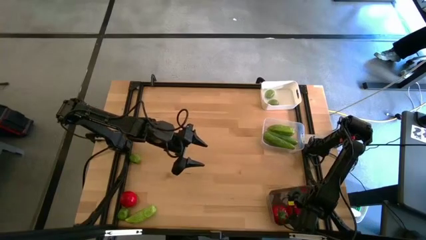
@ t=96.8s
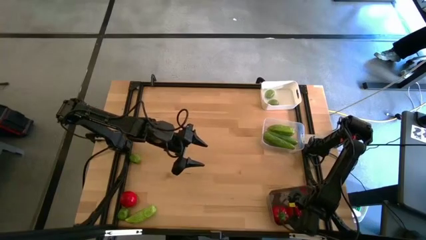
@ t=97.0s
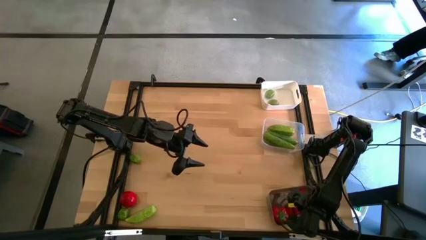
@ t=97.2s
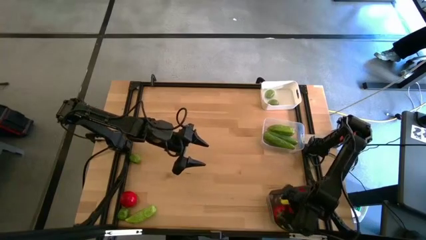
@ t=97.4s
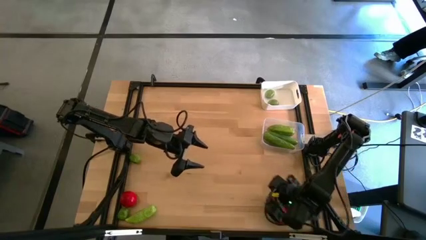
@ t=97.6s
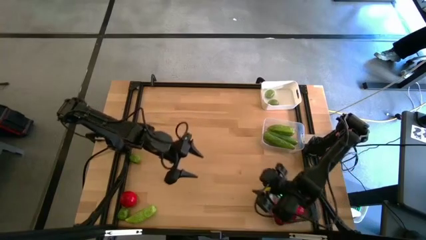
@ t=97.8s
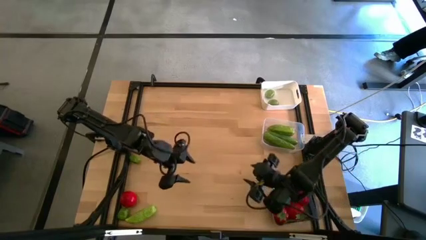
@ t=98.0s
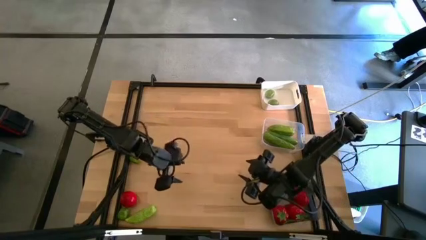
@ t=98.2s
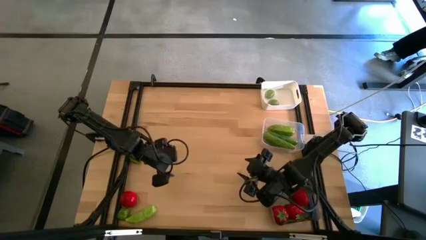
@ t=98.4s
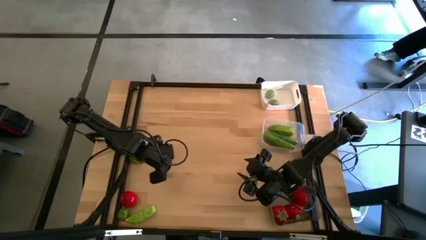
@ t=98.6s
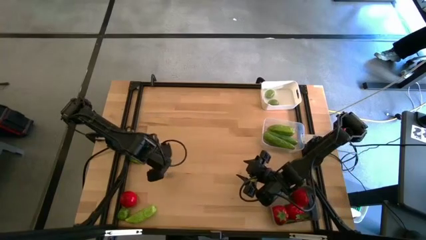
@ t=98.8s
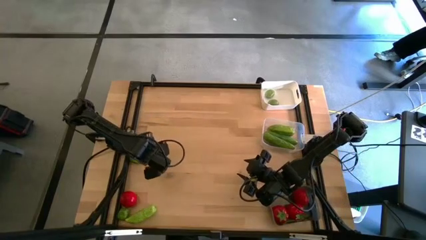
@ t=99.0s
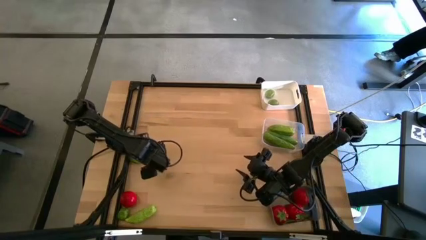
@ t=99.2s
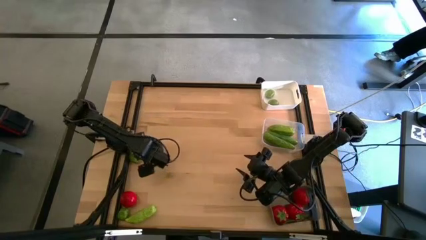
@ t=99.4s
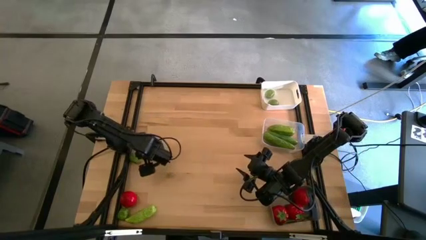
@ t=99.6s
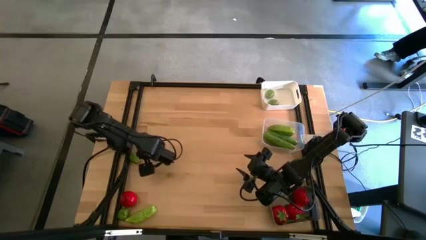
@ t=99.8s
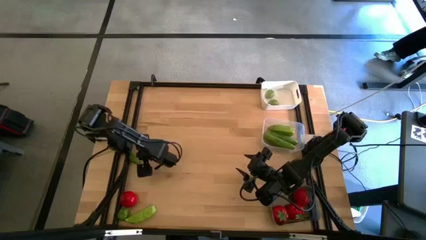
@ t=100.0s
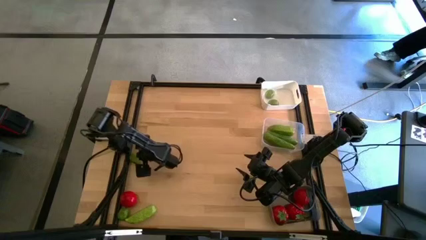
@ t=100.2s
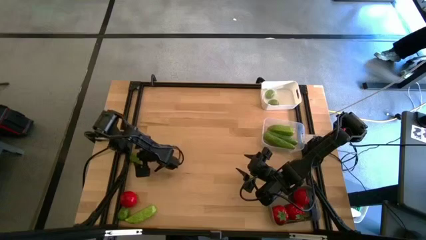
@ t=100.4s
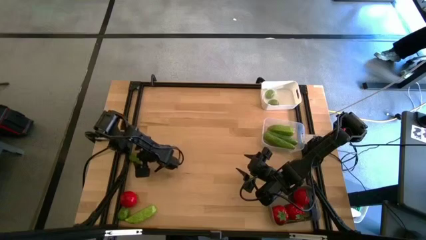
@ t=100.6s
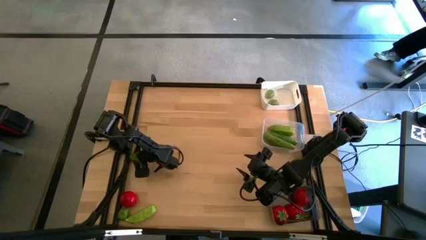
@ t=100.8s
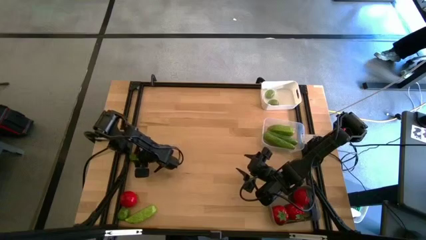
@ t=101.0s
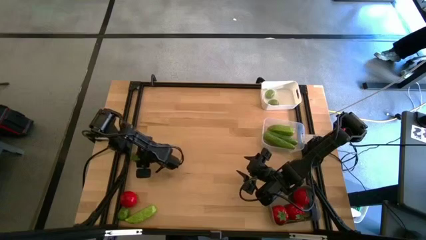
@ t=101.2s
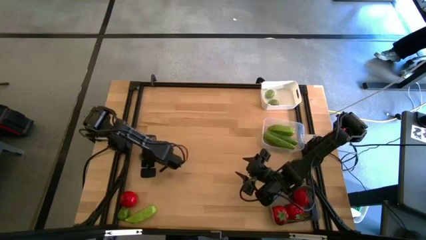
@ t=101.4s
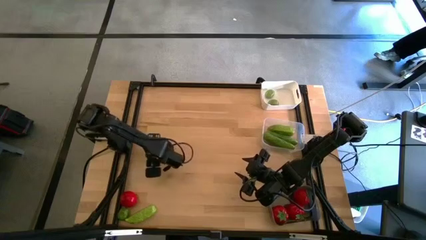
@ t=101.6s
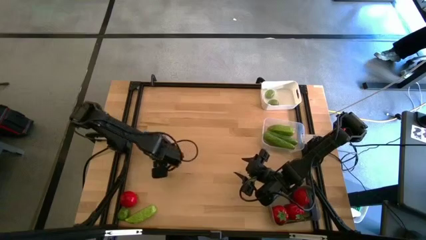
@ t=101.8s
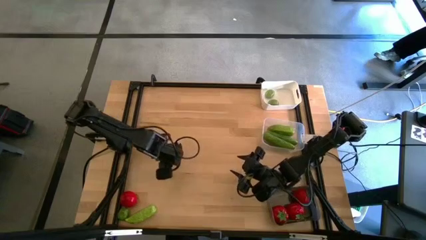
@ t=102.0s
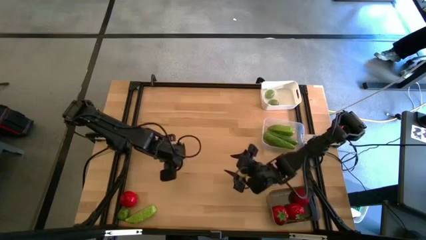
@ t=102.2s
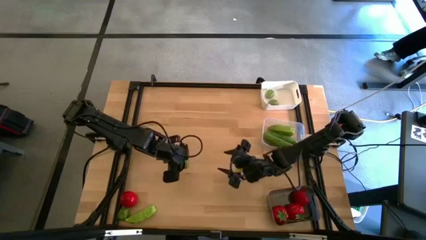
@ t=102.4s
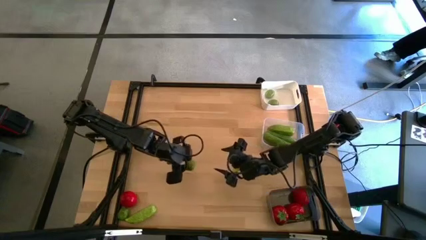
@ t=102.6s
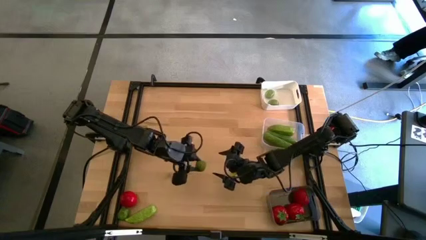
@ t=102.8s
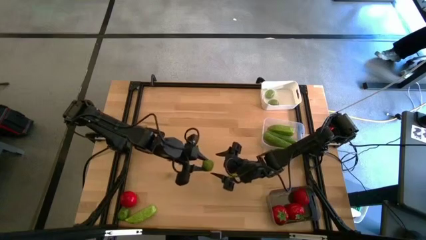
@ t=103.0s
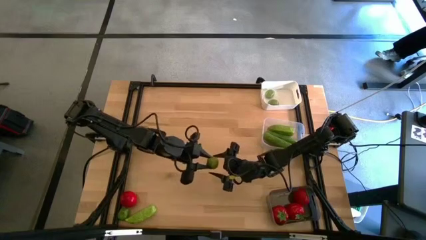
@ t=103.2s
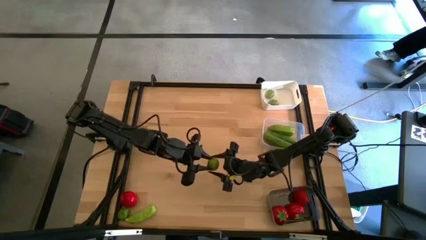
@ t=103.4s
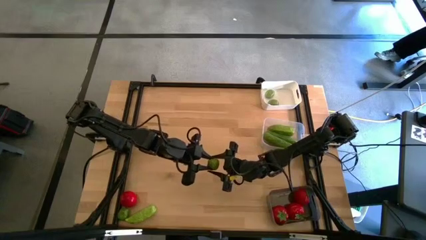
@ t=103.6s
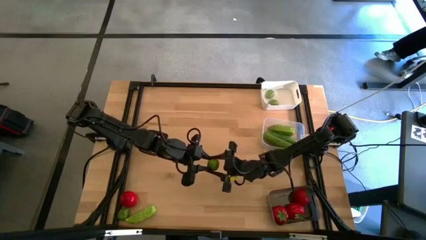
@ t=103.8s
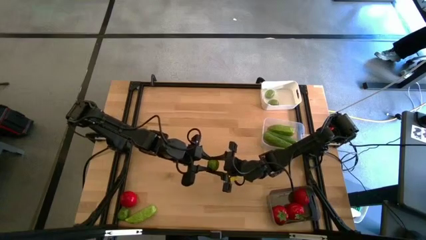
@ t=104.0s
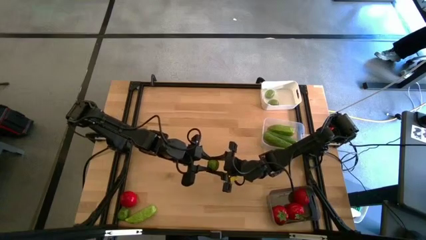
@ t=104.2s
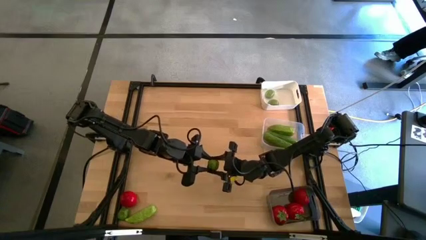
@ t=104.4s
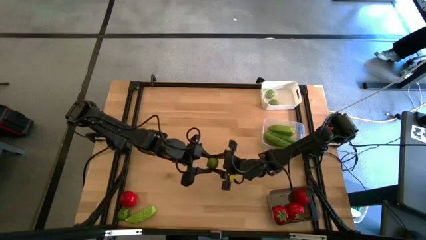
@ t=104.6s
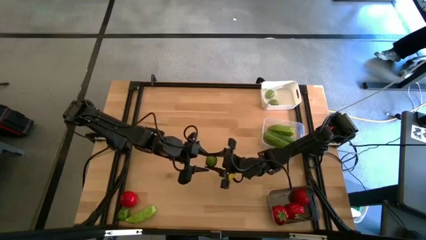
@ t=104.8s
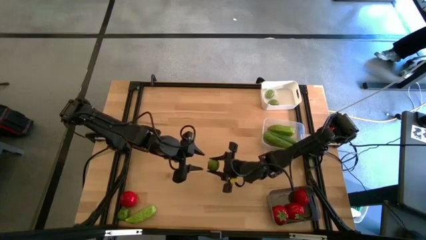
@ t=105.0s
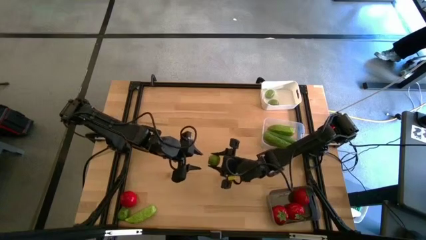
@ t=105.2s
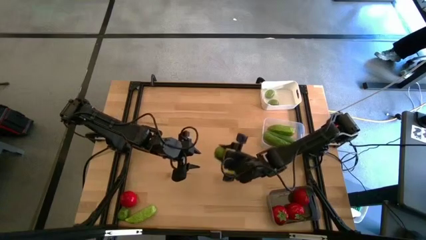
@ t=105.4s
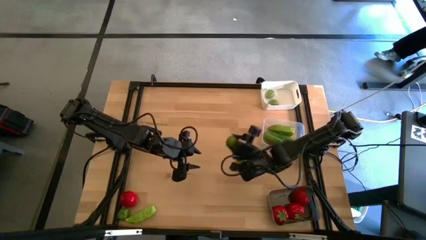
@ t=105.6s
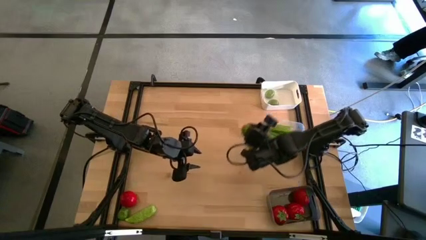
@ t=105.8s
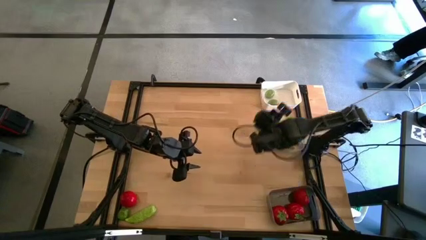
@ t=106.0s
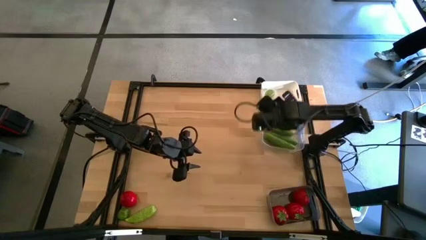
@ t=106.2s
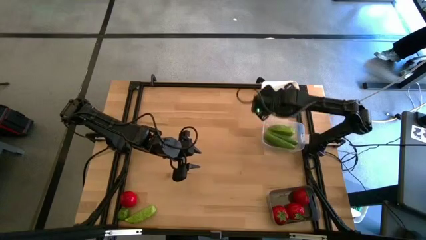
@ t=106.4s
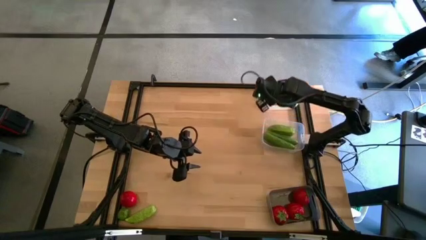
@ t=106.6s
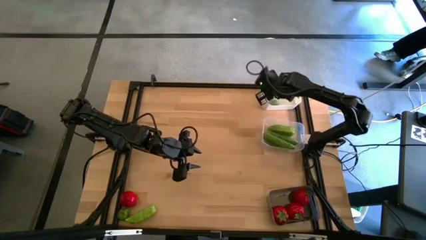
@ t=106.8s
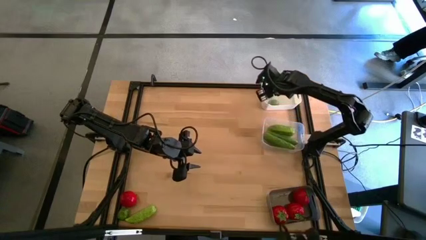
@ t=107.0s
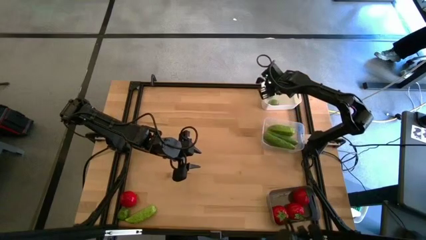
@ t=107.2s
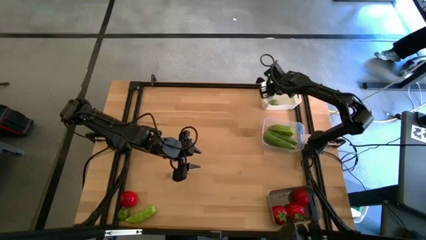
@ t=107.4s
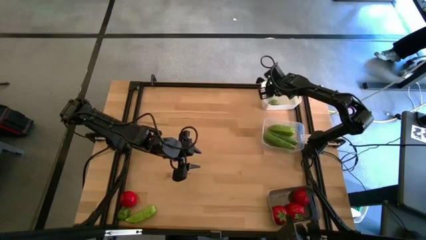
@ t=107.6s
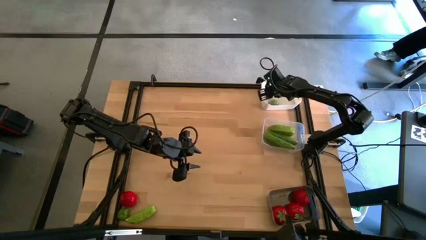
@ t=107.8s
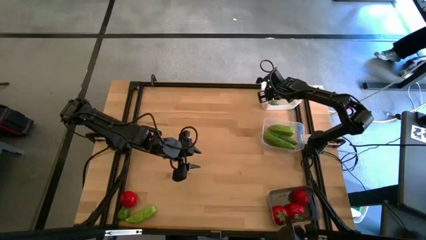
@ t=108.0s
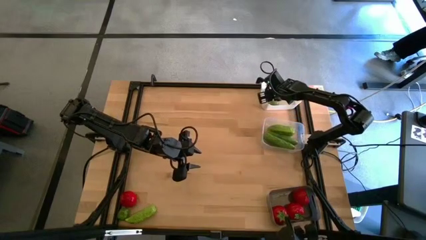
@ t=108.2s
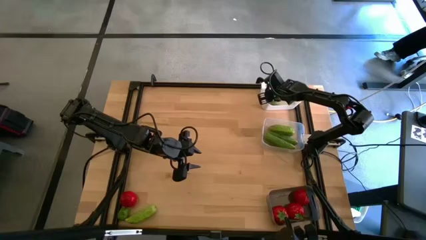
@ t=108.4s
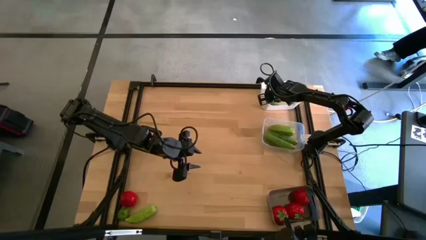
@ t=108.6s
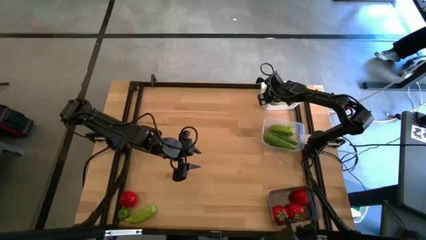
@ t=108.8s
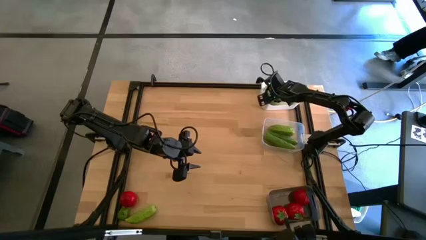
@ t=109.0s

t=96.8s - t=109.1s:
Task: Sort produce into baskets
Put the bottom lime into the white bin
